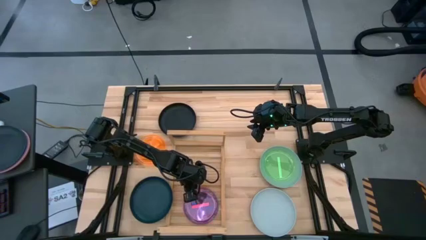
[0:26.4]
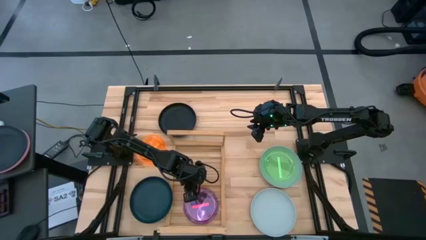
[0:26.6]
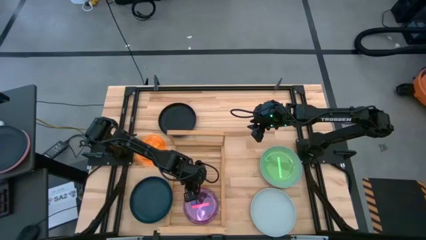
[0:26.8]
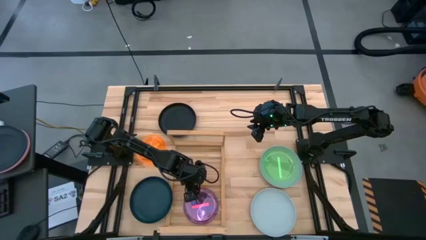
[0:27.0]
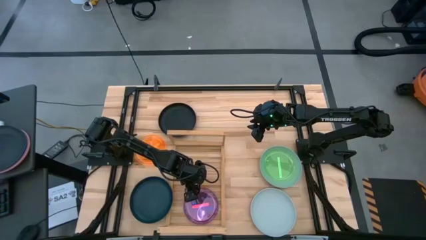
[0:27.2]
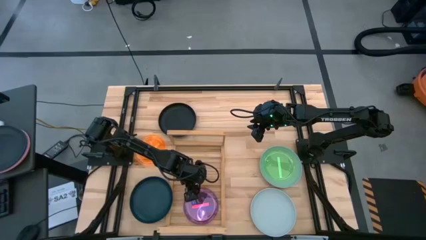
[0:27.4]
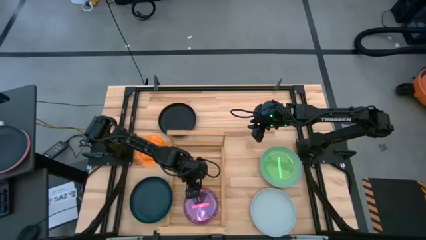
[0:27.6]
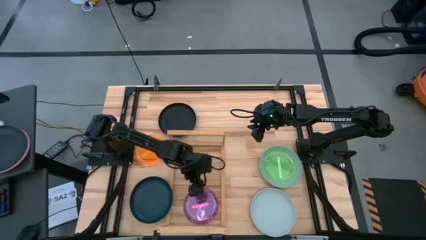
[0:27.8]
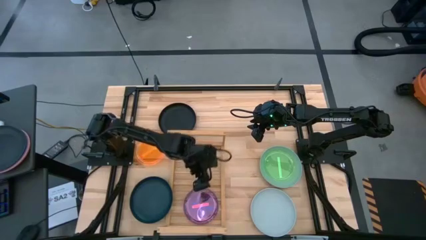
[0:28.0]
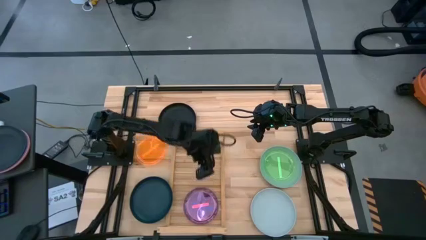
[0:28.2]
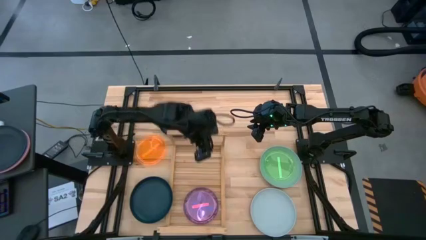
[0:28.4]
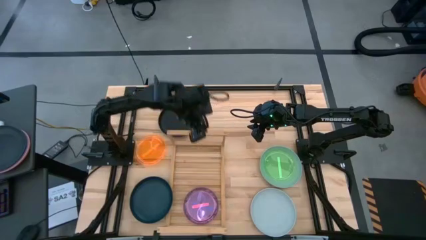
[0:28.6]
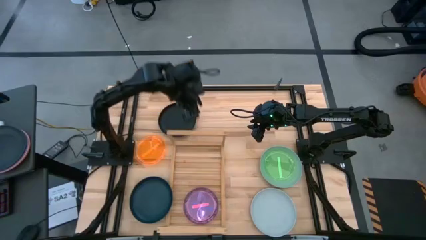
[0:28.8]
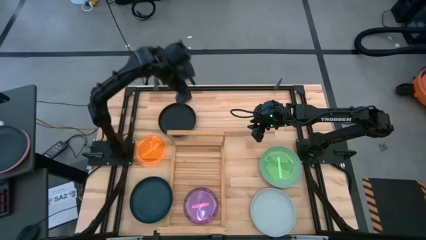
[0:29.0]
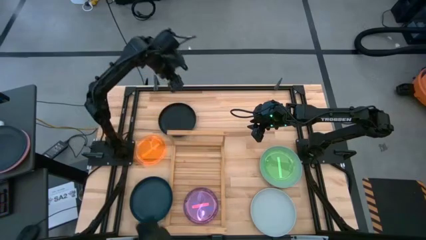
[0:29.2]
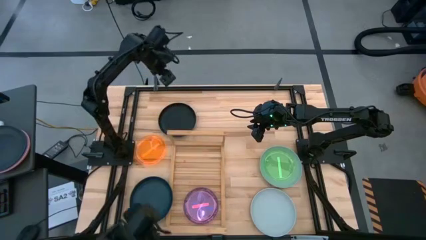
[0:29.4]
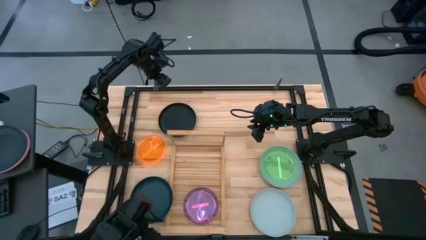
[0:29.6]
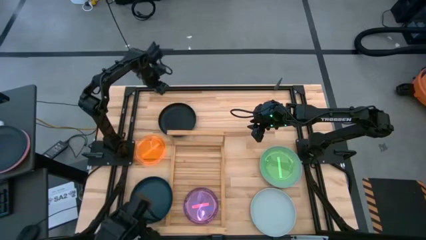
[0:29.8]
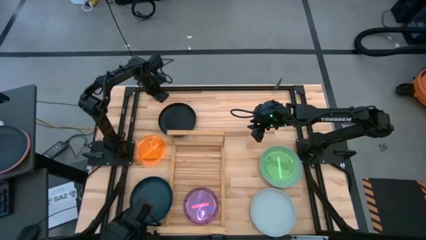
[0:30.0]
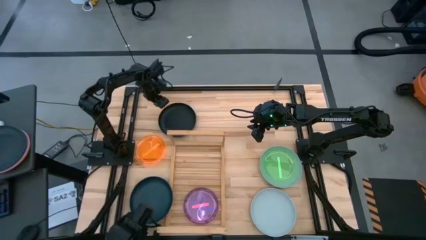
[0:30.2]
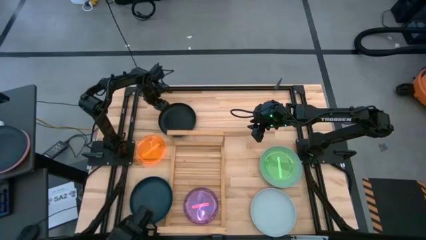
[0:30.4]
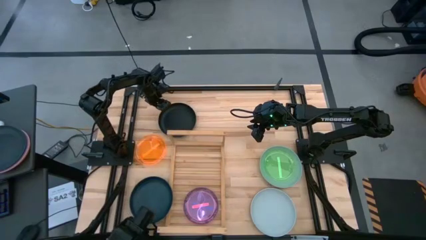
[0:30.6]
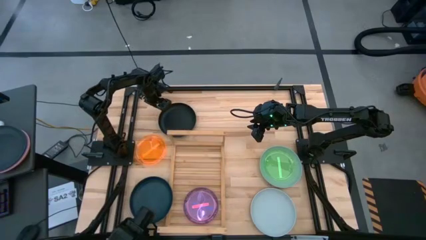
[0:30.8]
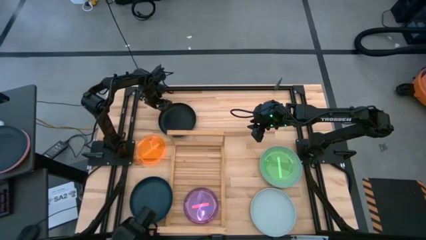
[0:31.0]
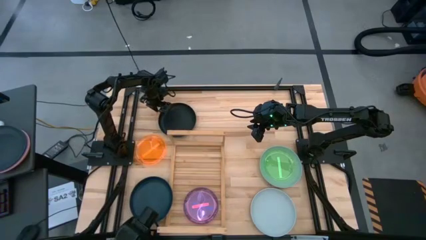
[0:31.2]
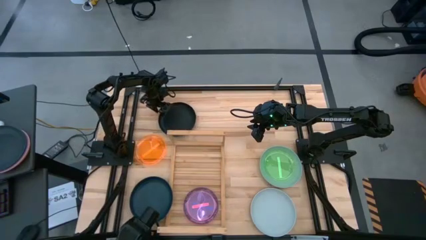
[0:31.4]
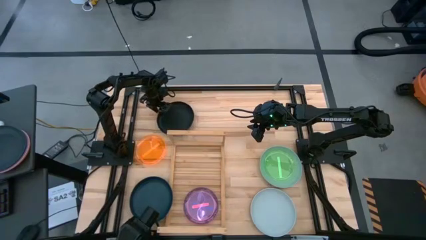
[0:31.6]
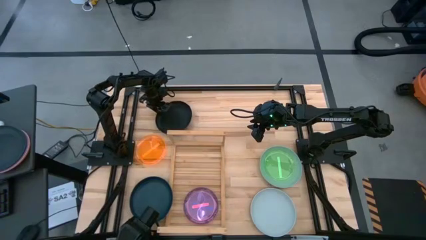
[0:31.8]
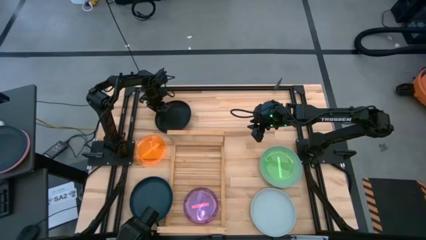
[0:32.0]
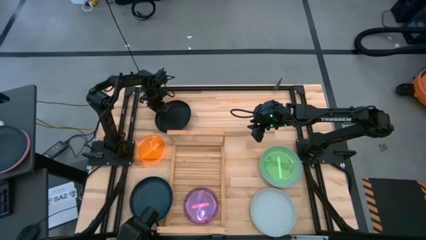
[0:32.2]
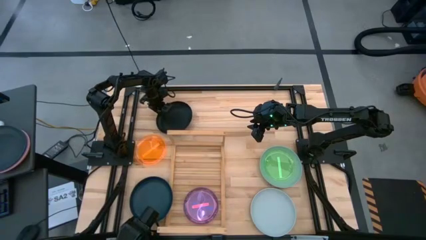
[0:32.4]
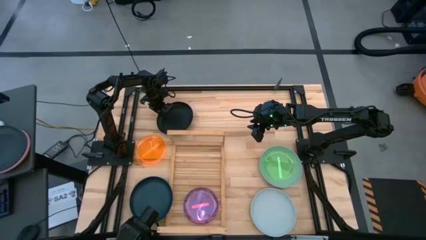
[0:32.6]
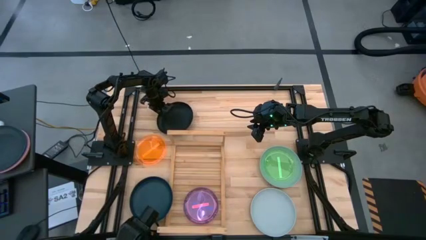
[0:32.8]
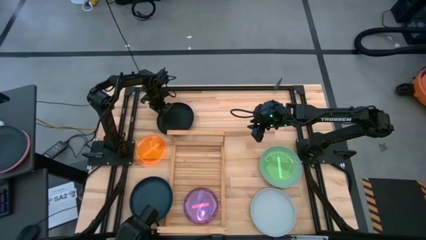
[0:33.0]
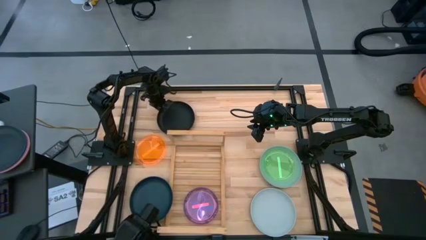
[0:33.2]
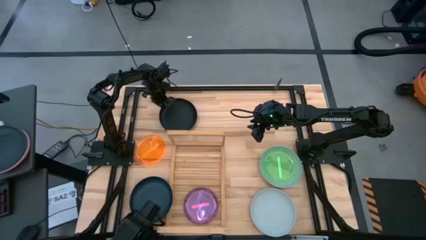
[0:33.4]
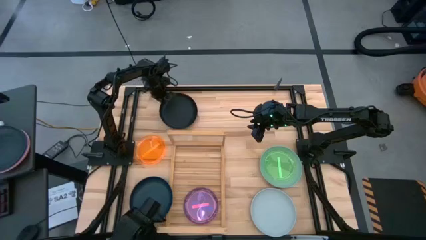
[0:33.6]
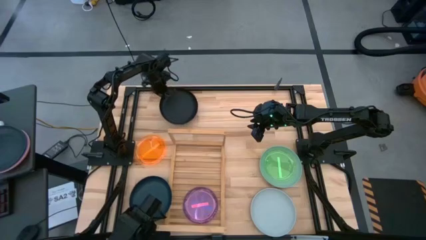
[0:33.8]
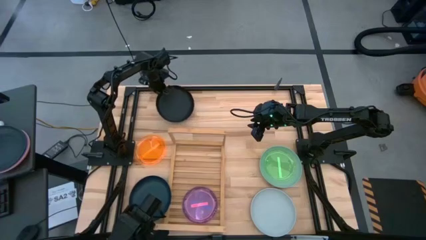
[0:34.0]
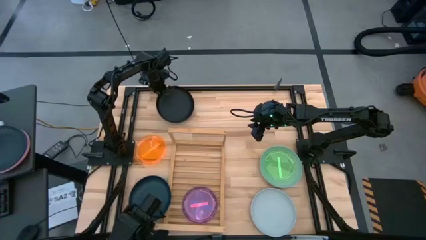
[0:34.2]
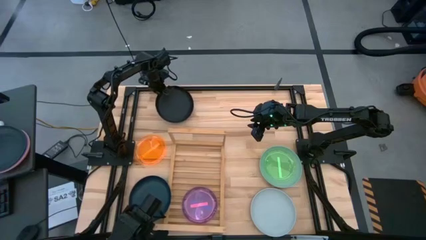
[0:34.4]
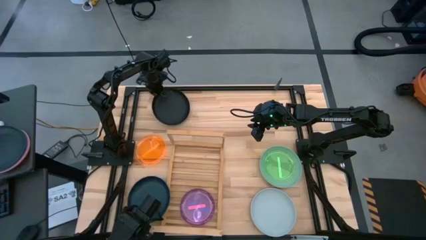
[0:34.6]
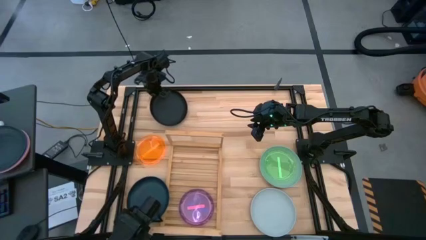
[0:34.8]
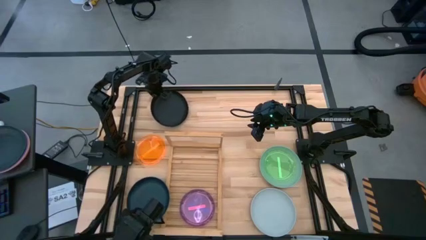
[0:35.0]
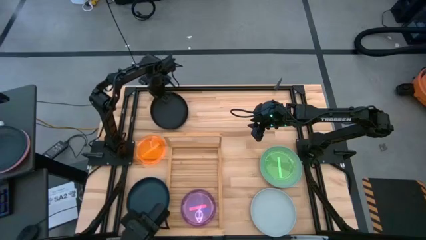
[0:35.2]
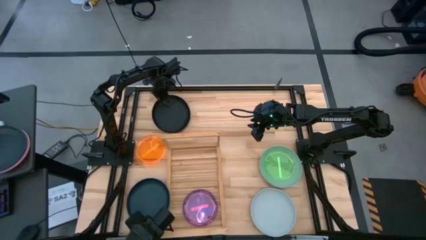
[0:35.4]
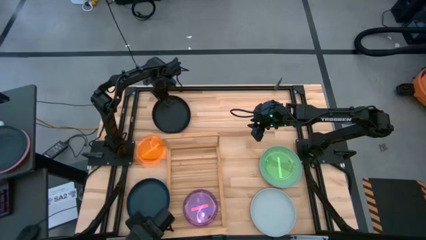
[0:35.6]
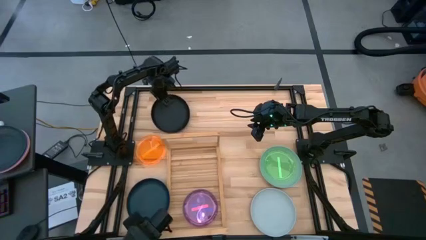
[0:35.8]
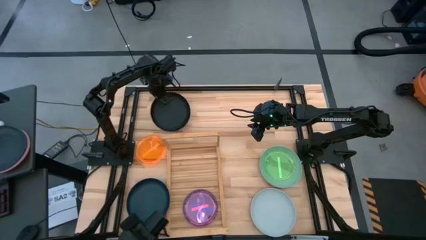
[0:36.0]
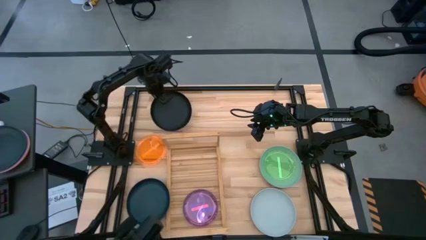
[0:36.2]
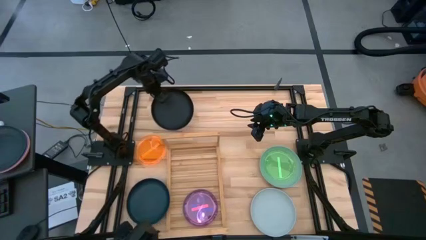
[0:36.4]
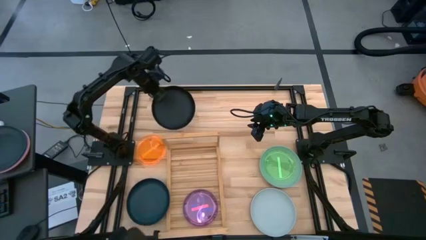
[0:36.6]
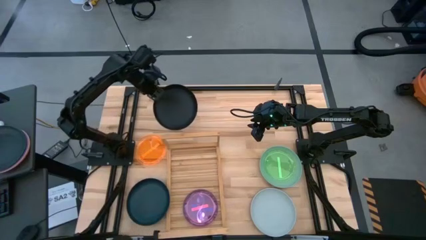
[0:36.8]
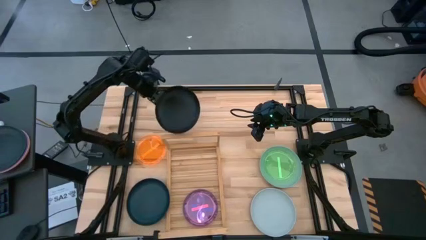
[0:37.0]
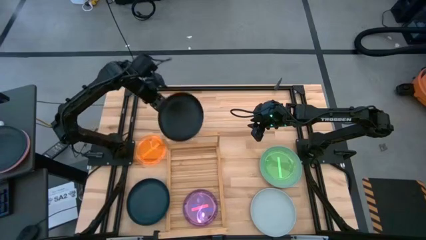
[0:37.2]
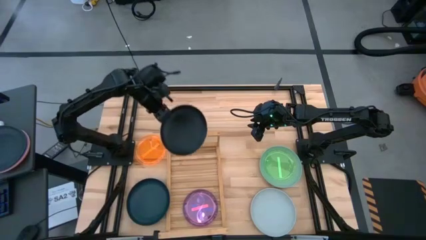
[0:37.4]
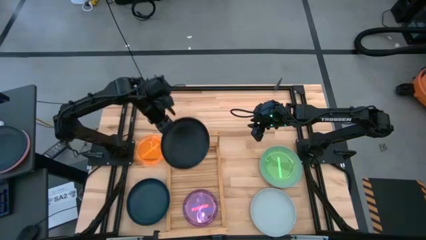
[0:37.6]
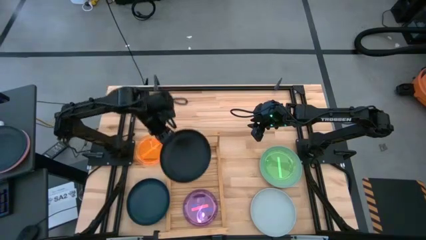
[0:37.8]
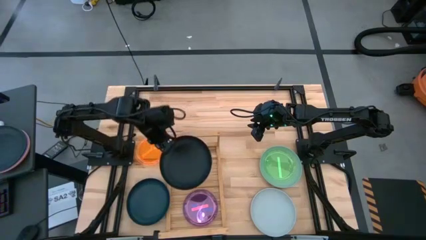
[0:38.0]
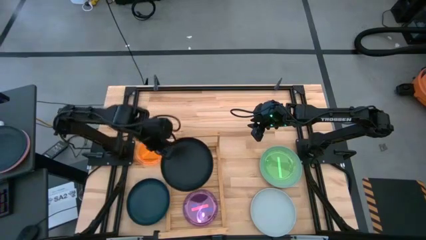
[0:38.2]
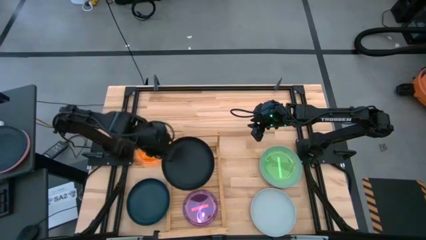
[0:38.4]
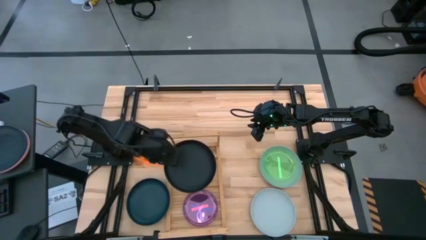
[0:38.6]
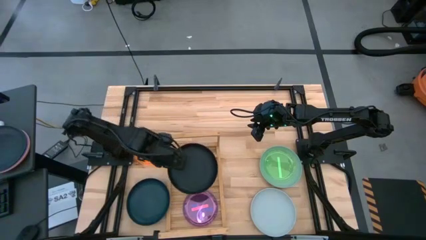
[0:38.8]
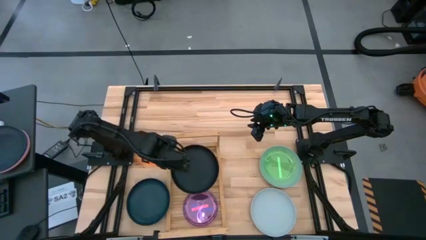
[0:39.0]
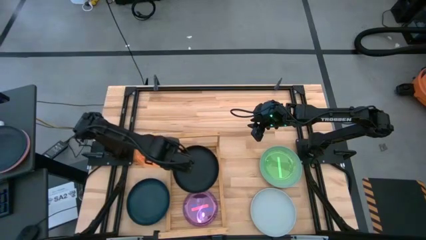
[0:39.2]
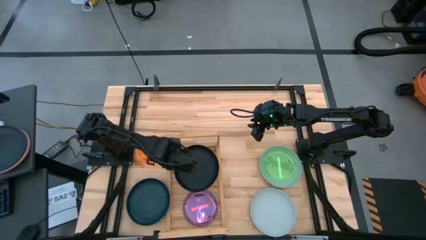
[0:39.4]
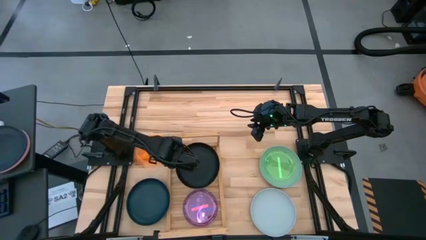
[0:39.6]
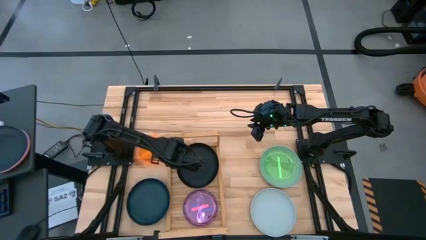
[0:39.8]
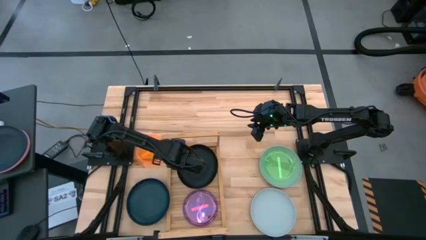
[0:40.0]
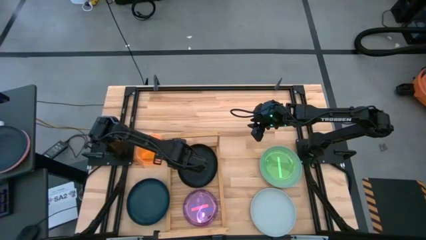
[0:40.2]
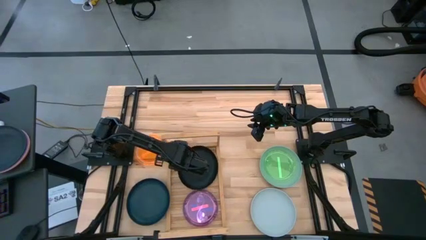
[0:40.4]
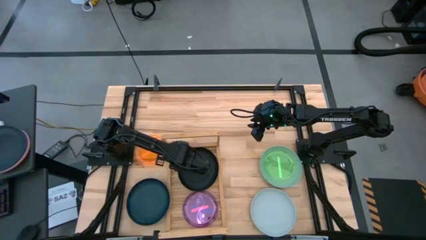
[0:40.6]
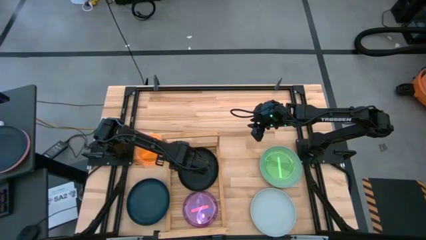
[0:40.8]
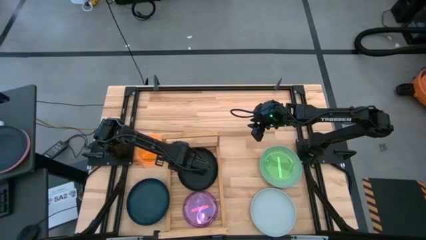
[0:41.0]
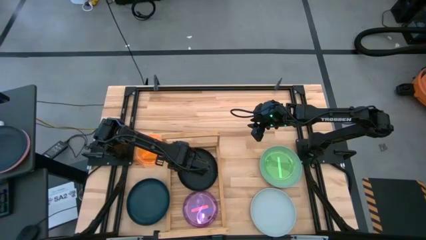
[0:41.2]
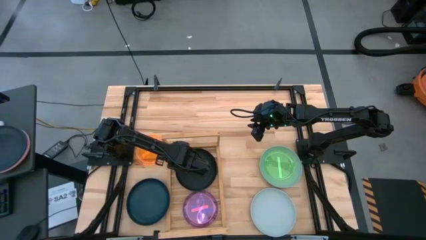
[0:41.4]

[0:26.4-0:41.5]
Task: Place and stack plates onto a shelf
Put the top big black plate on the shelf
